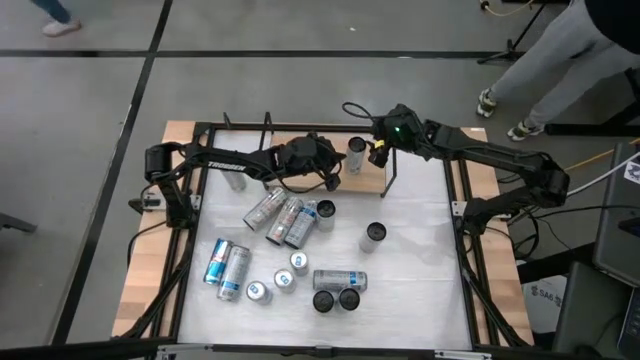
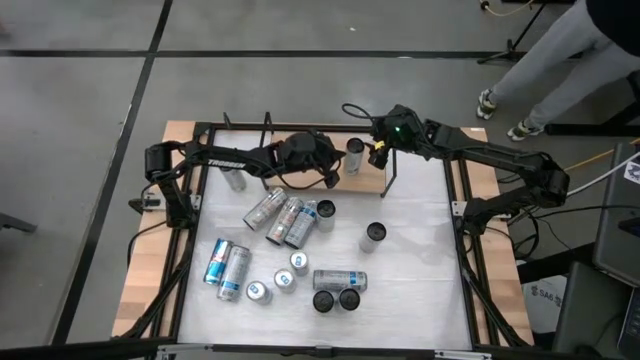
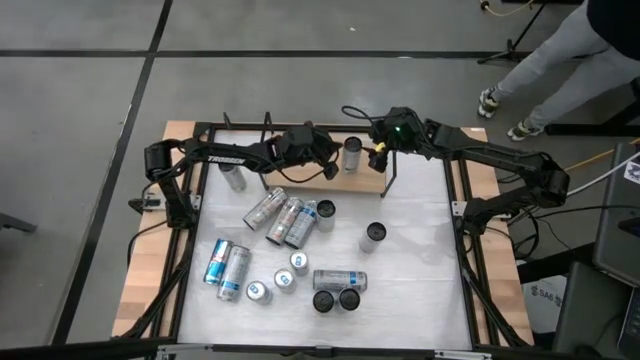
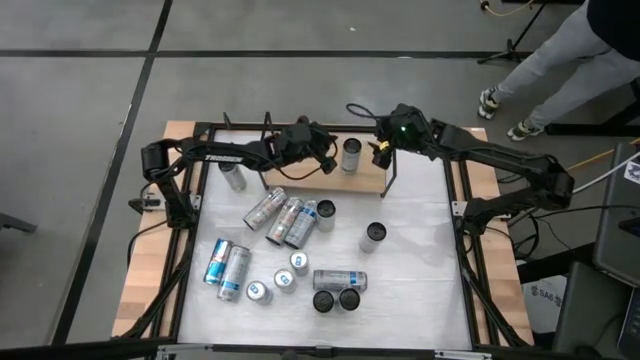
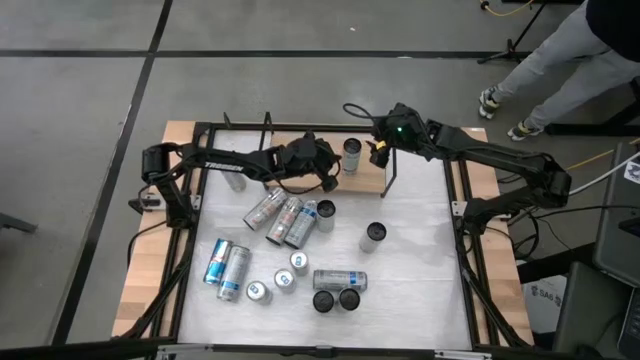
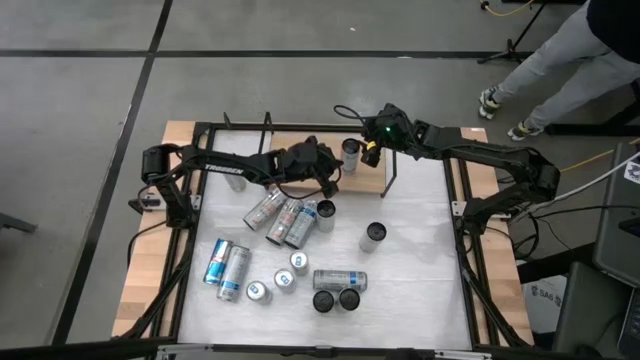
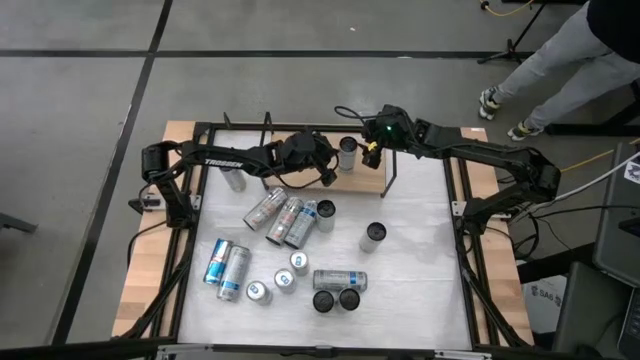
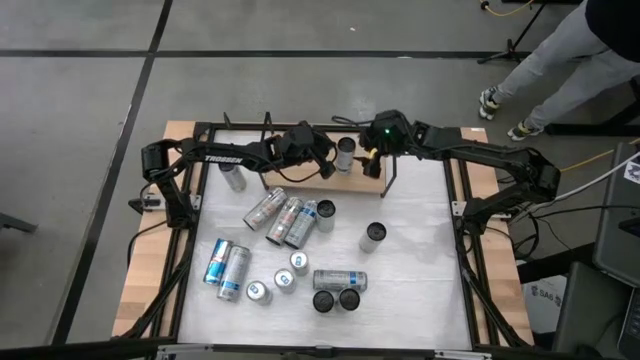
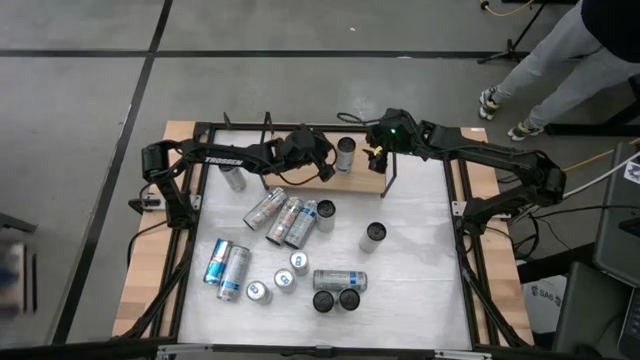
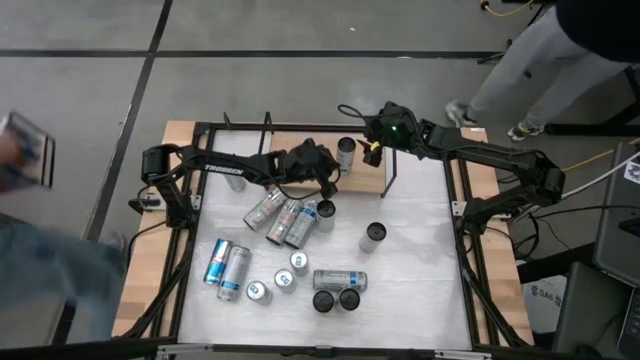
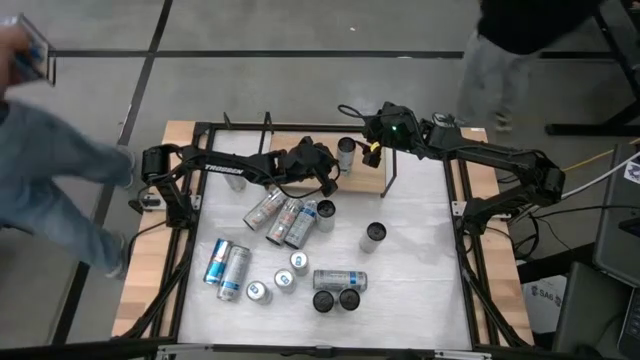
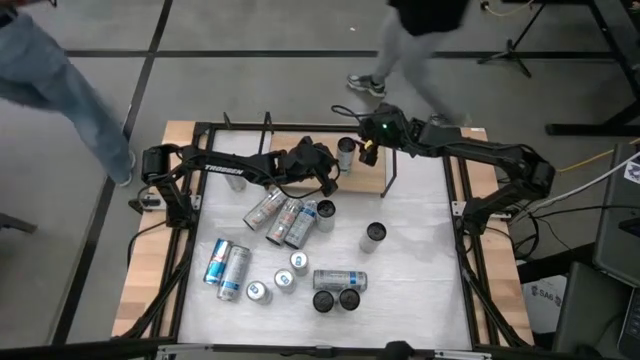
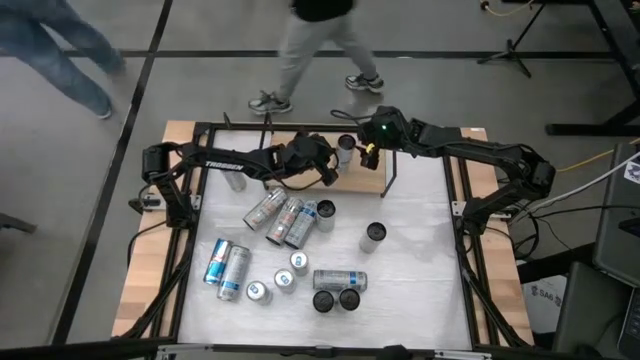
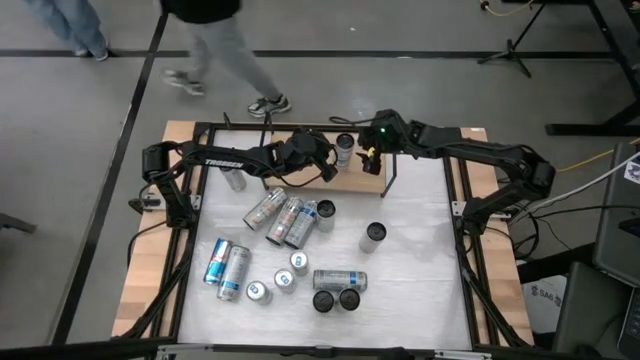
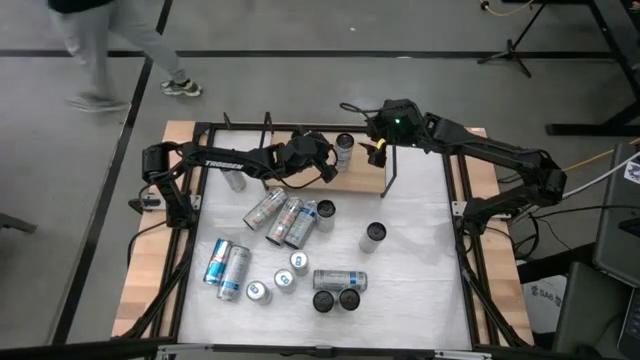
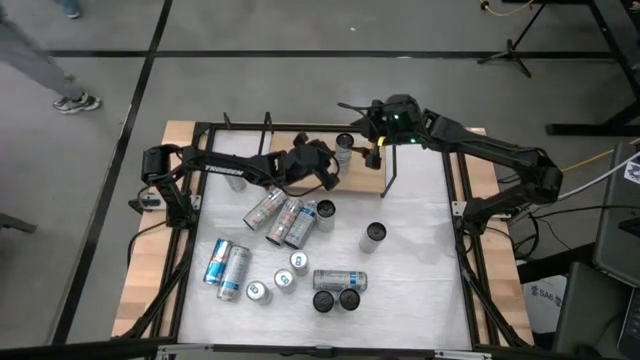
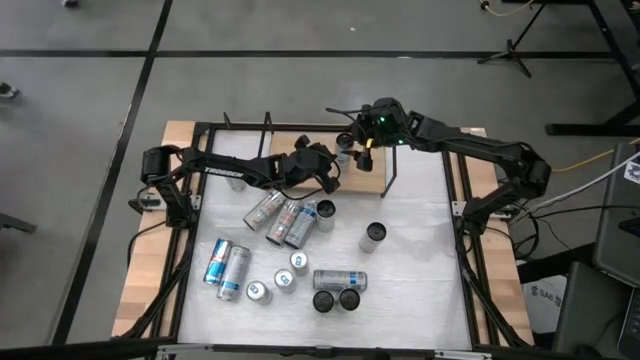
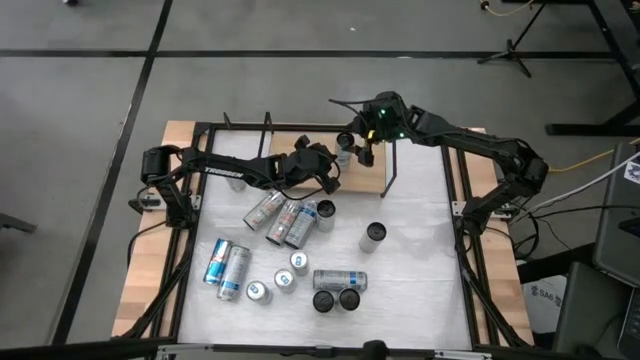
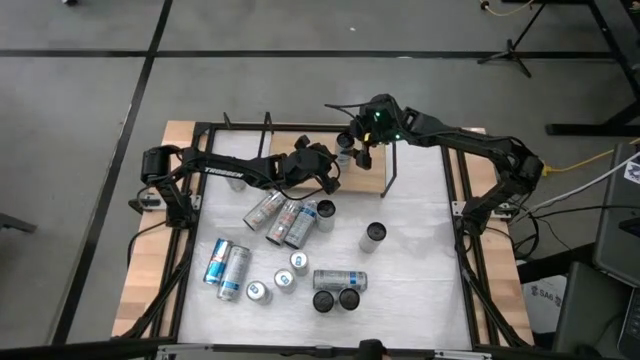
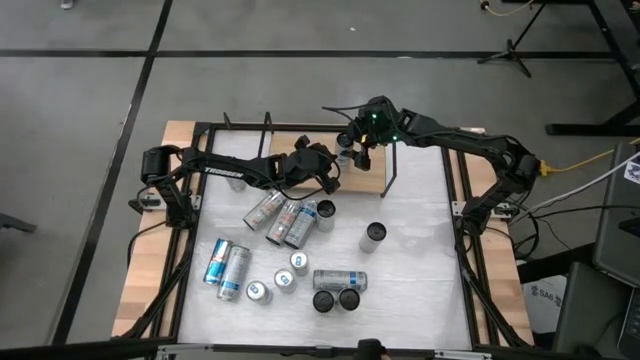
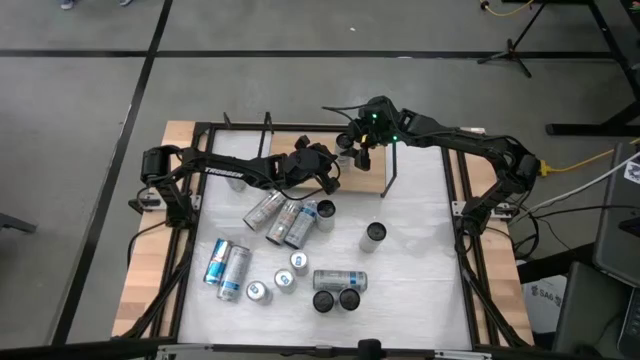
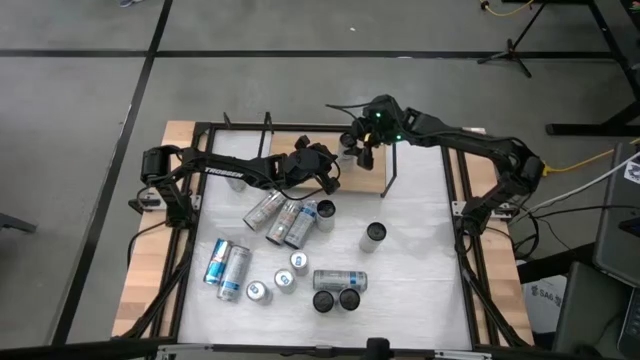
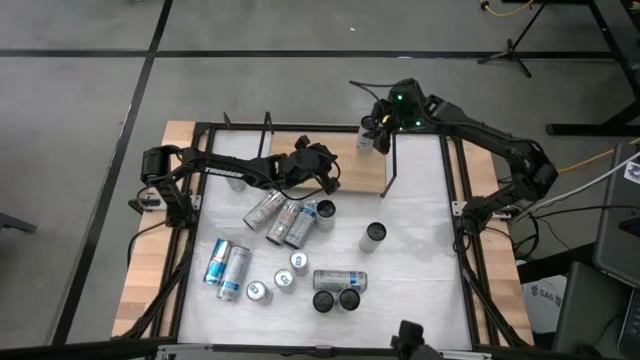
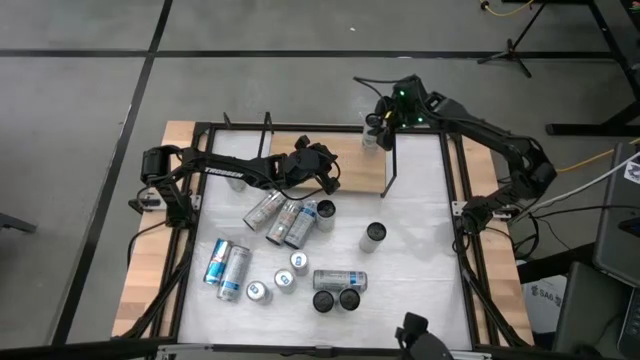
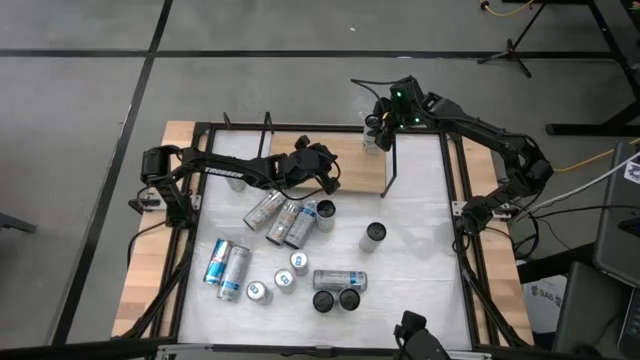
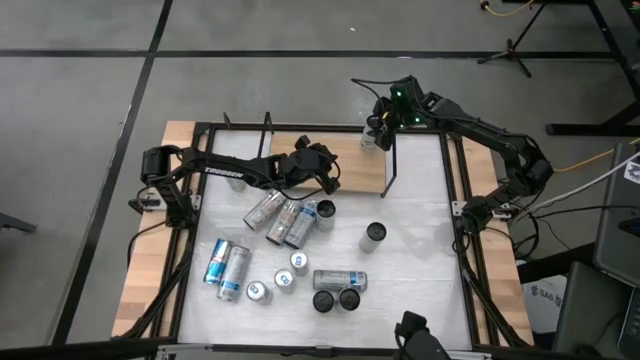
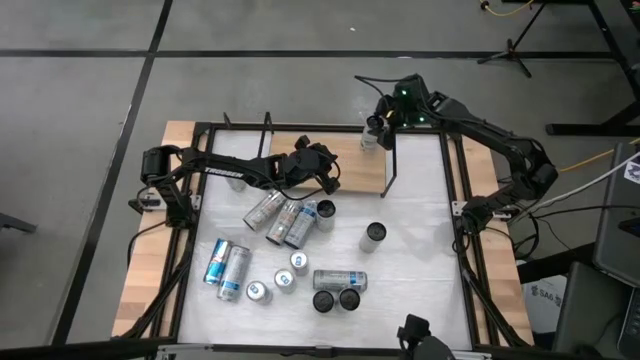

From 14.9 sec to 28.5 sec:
Task: Place canned beverage on shelf
Put the white soda can on the shelf

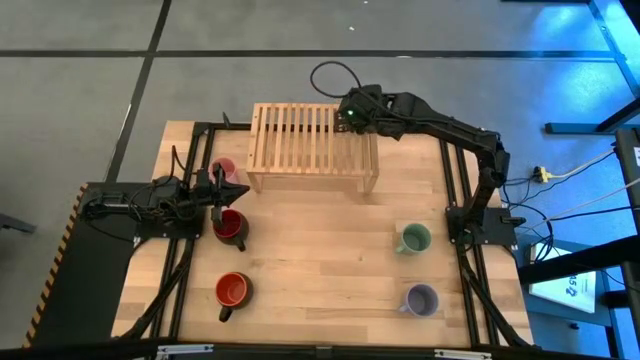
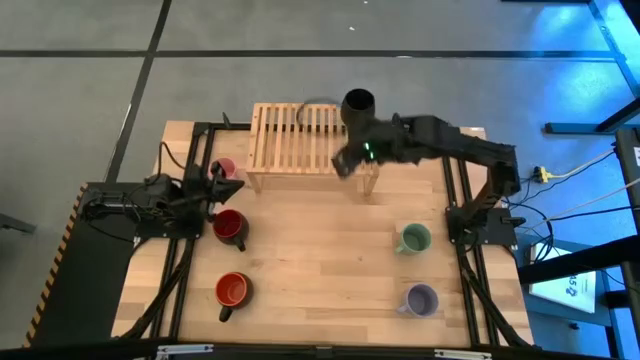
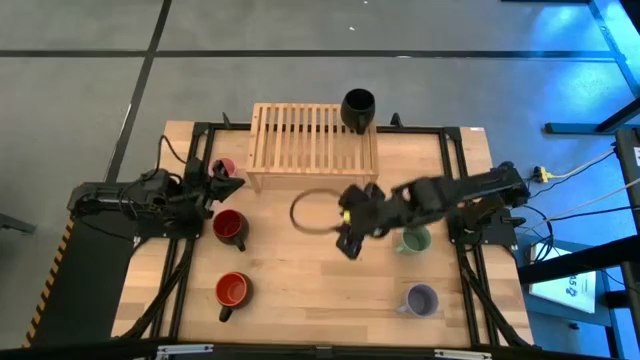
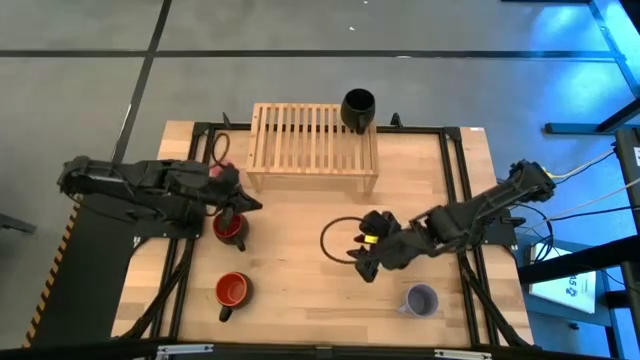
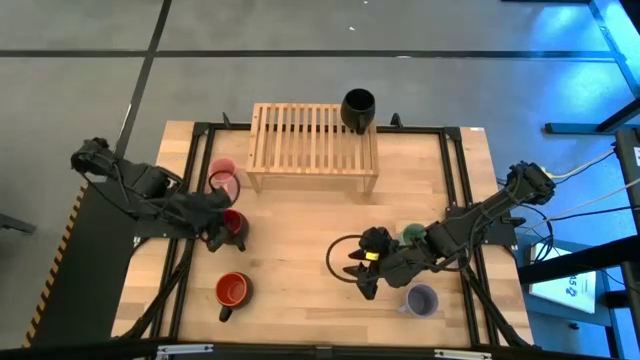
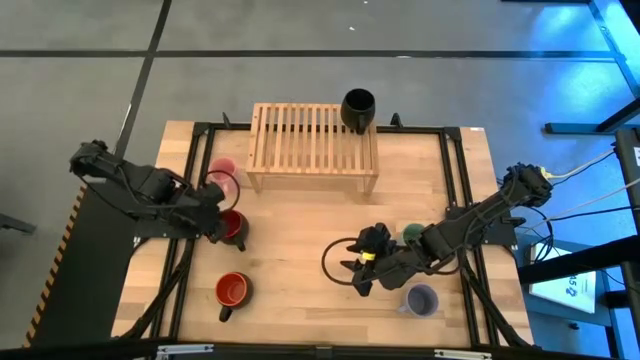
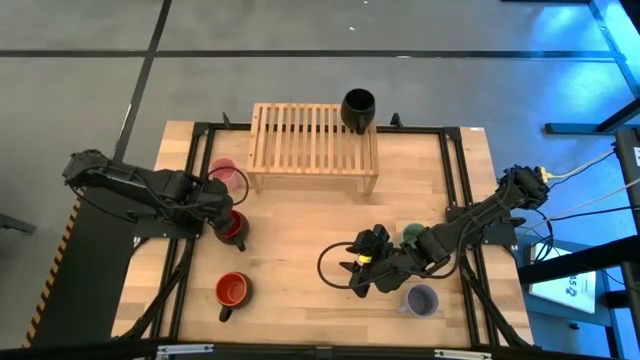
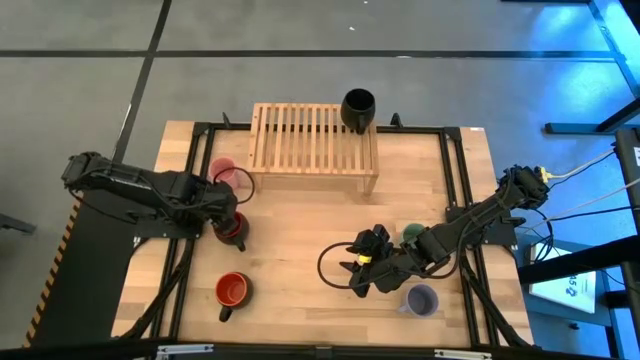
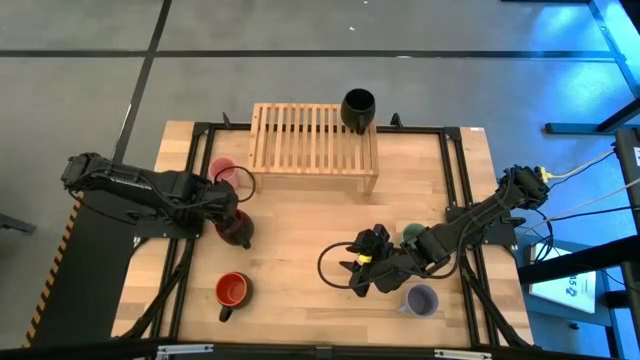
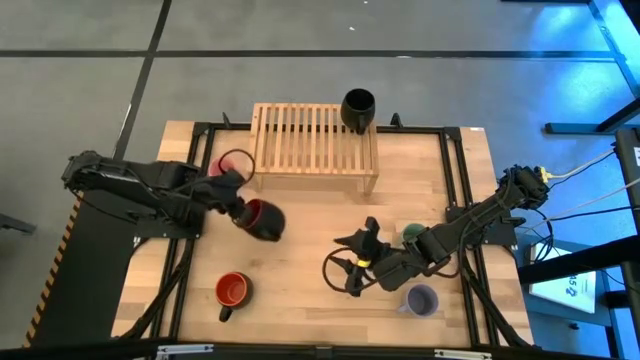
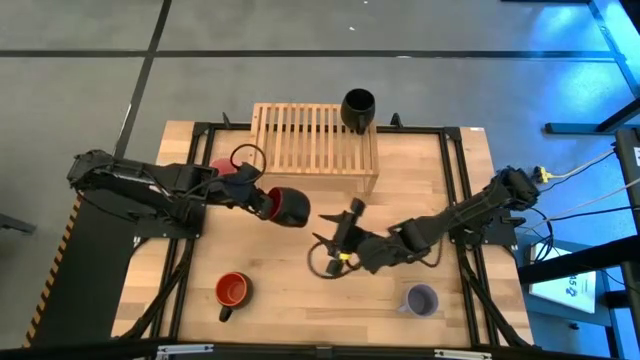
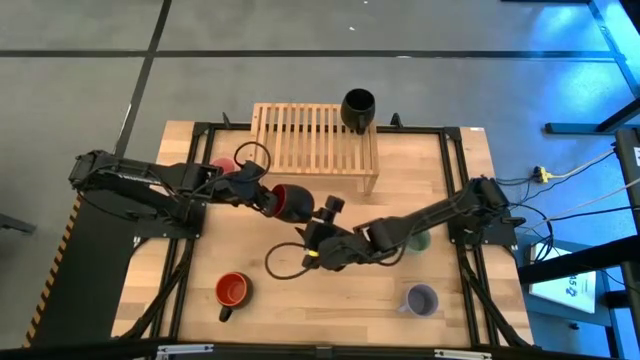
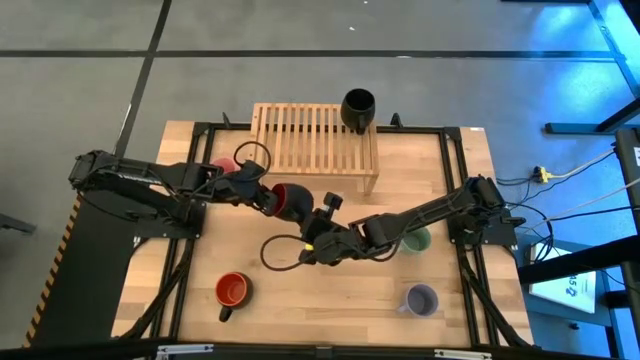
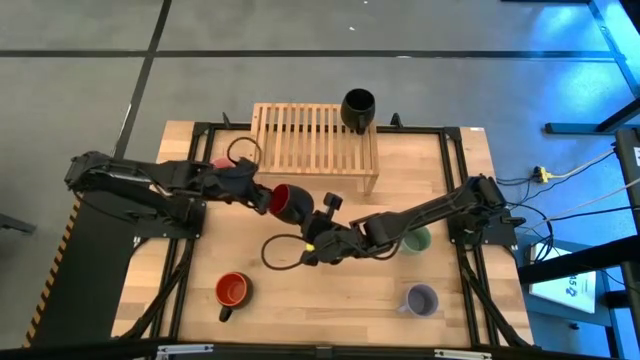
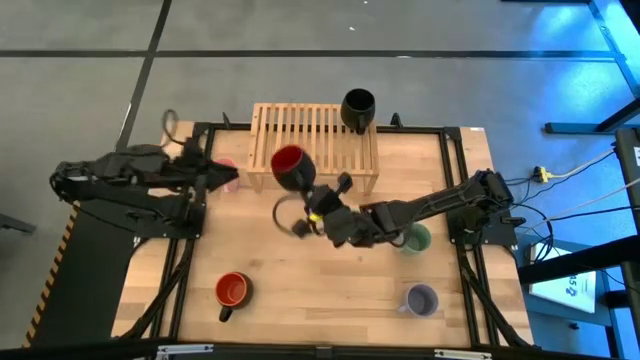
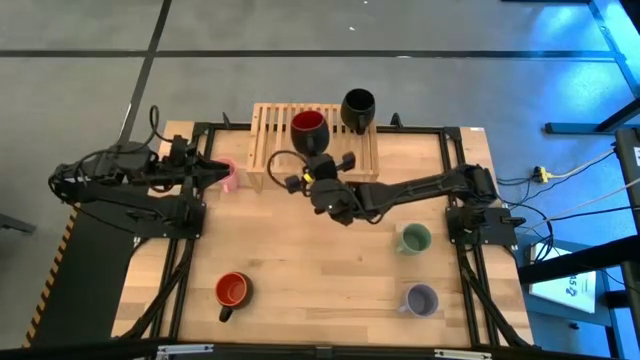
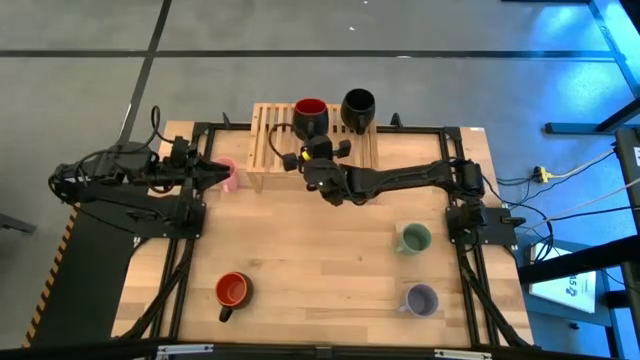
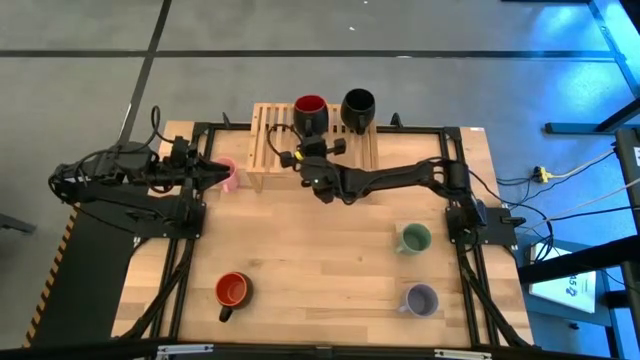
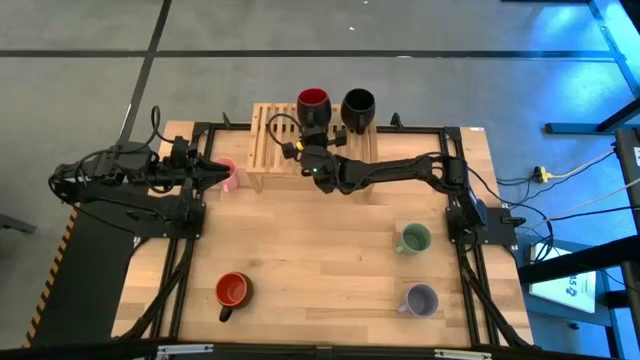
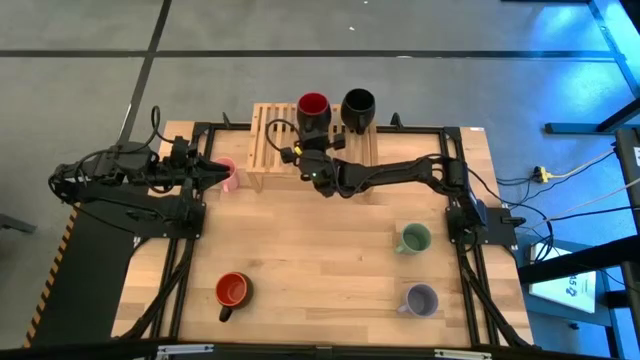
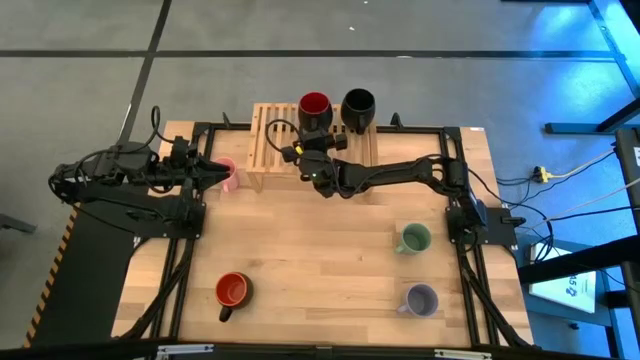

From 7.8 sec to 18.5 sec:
Task: Place coffee mugs
Put the red black mug on the shelf
